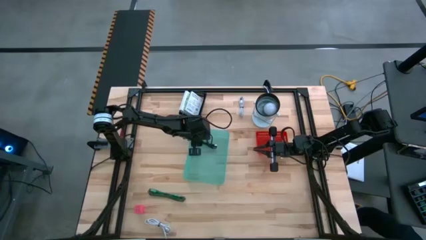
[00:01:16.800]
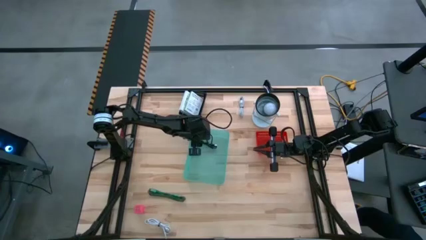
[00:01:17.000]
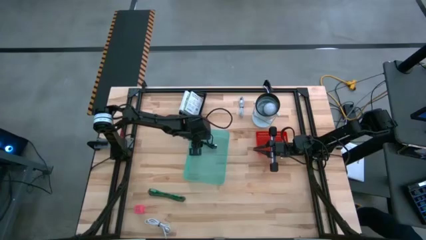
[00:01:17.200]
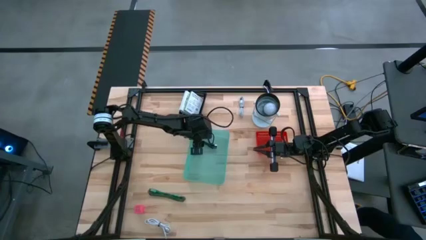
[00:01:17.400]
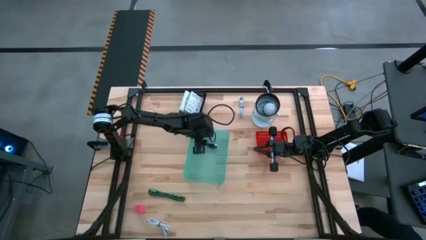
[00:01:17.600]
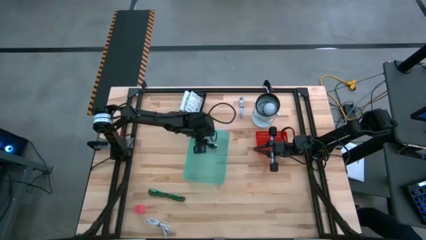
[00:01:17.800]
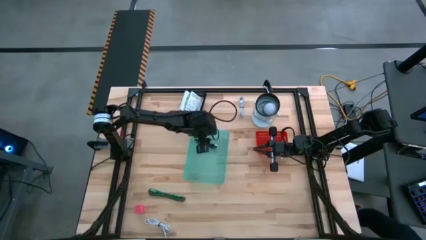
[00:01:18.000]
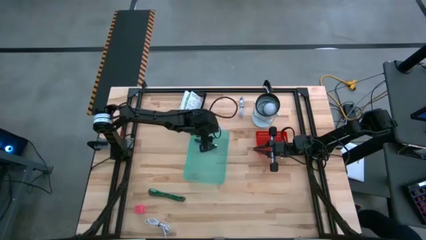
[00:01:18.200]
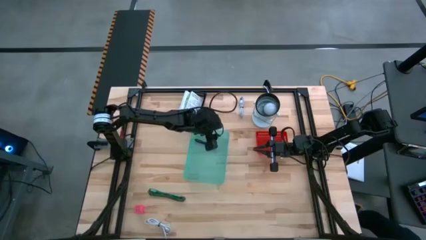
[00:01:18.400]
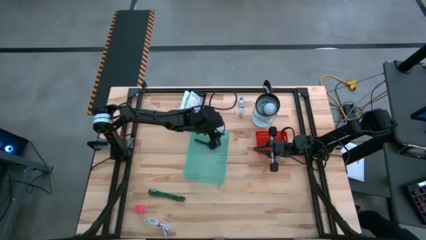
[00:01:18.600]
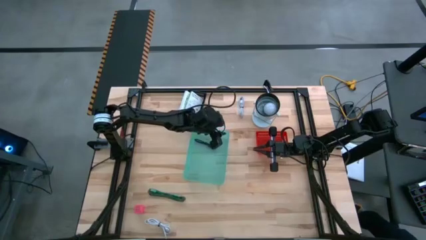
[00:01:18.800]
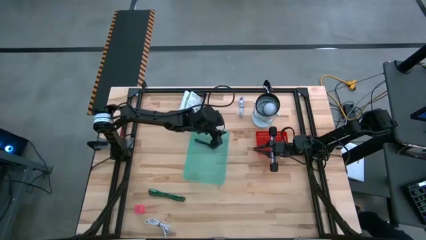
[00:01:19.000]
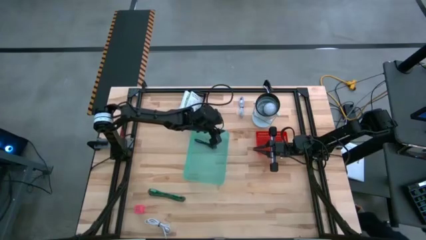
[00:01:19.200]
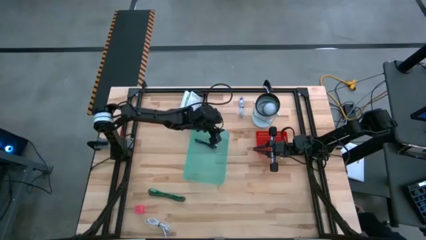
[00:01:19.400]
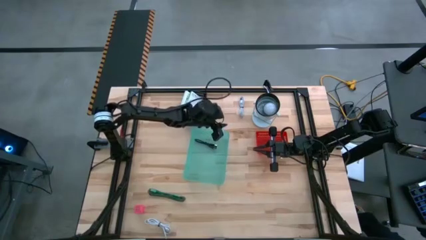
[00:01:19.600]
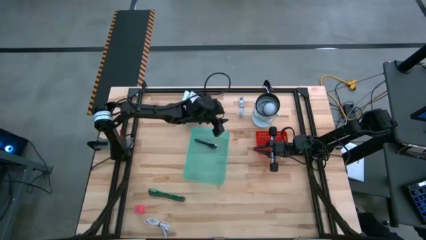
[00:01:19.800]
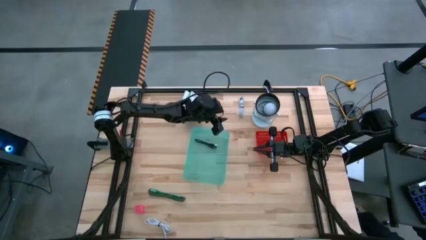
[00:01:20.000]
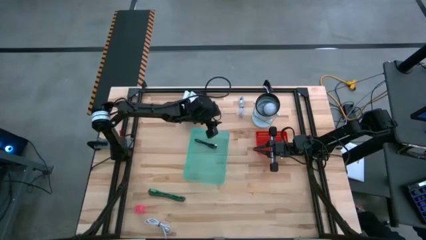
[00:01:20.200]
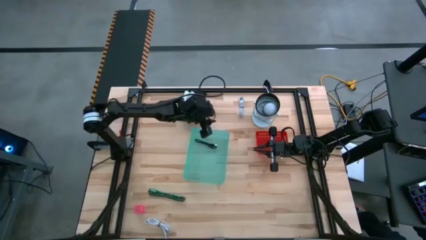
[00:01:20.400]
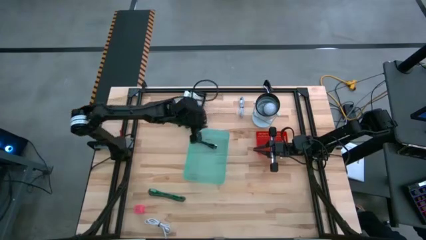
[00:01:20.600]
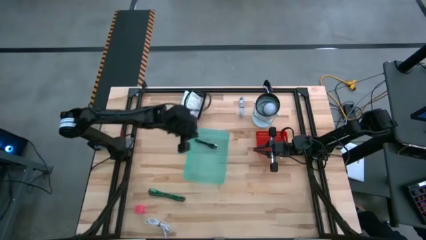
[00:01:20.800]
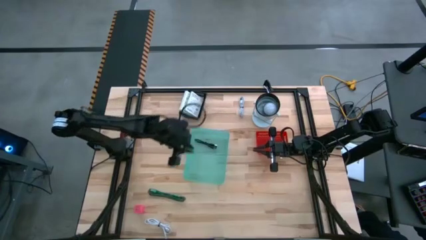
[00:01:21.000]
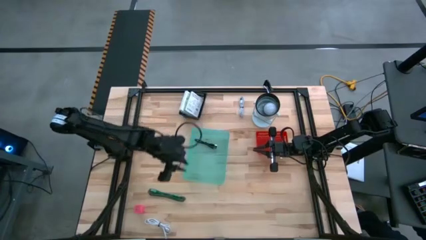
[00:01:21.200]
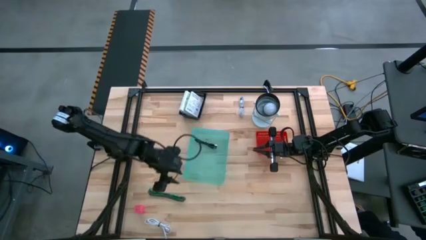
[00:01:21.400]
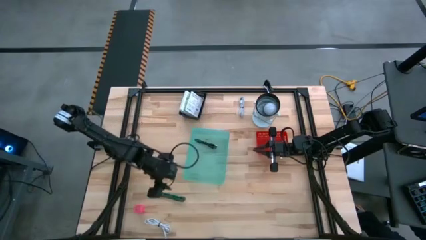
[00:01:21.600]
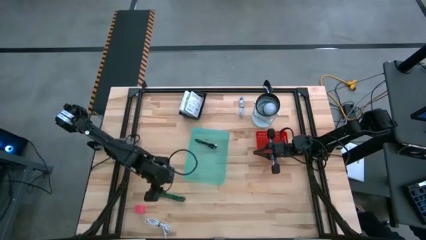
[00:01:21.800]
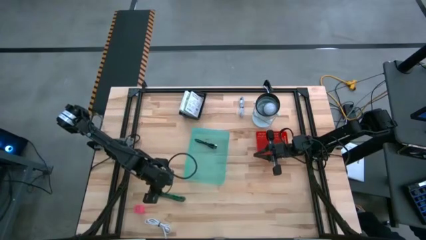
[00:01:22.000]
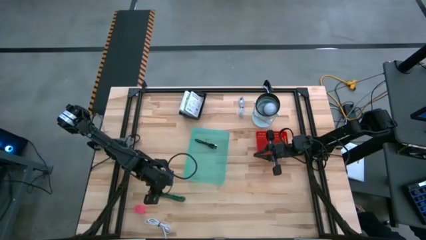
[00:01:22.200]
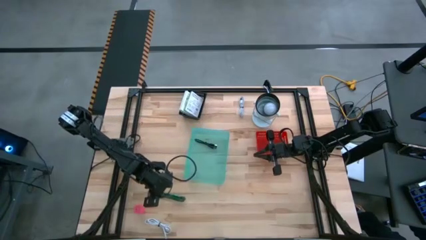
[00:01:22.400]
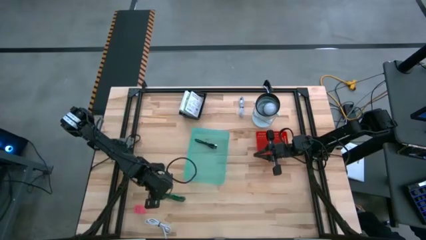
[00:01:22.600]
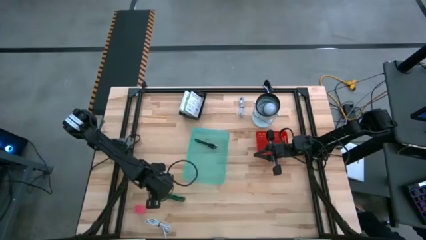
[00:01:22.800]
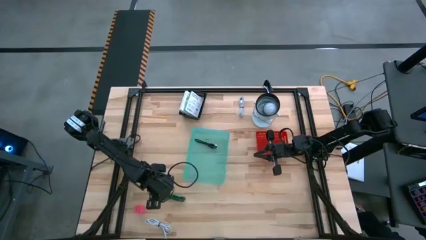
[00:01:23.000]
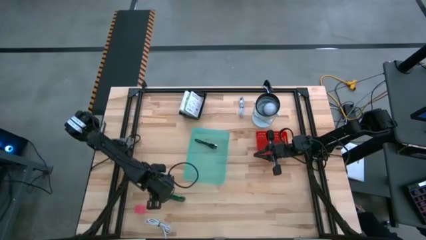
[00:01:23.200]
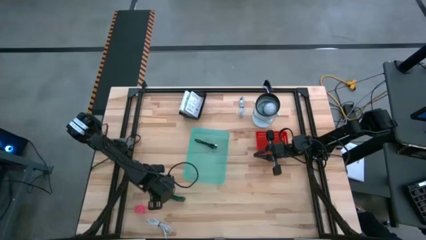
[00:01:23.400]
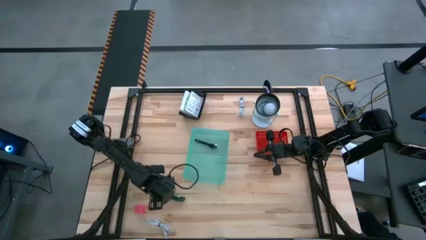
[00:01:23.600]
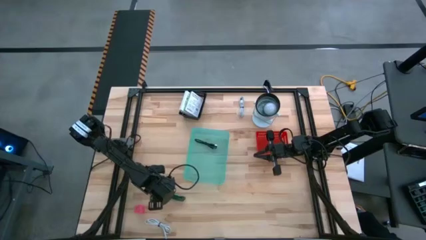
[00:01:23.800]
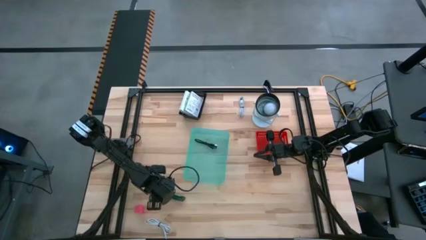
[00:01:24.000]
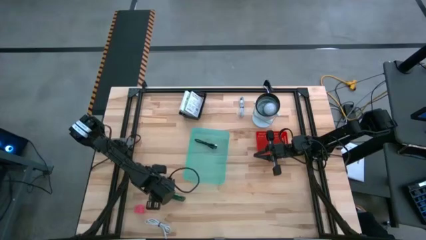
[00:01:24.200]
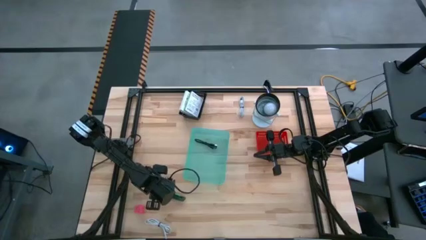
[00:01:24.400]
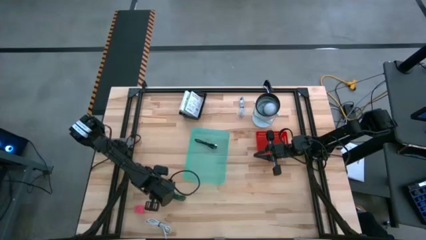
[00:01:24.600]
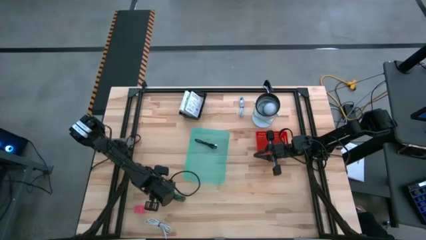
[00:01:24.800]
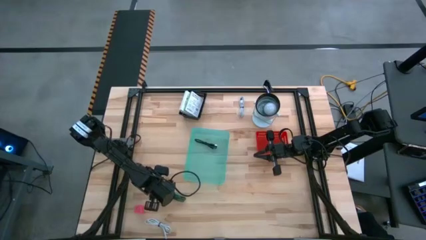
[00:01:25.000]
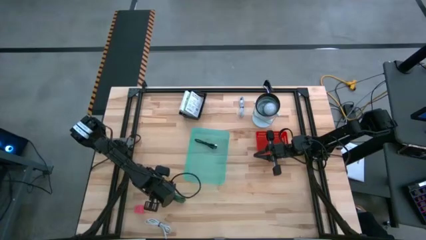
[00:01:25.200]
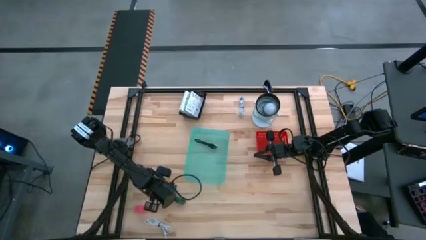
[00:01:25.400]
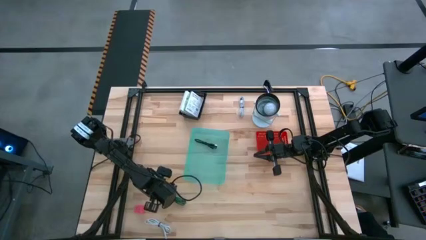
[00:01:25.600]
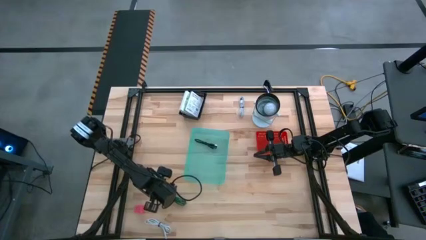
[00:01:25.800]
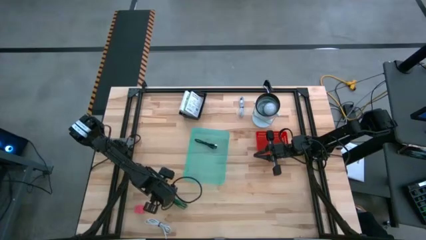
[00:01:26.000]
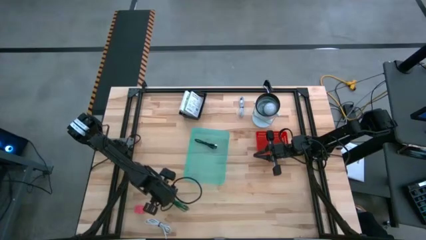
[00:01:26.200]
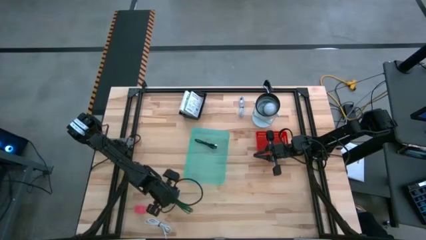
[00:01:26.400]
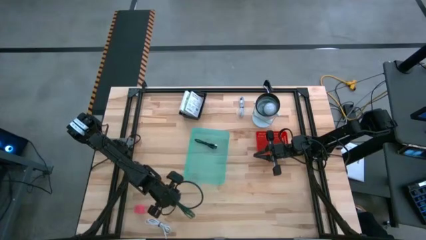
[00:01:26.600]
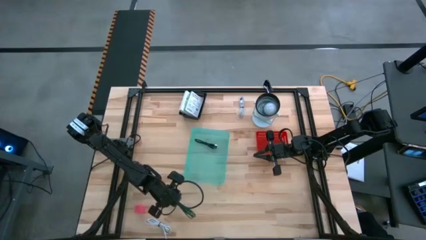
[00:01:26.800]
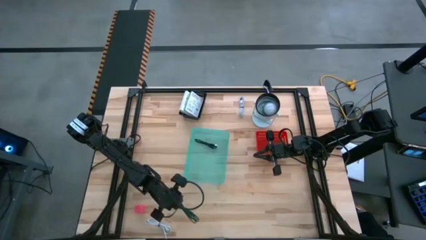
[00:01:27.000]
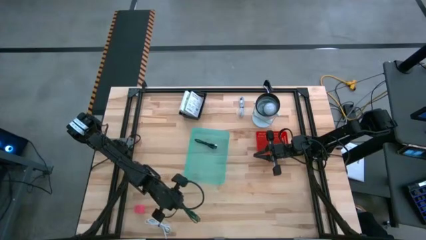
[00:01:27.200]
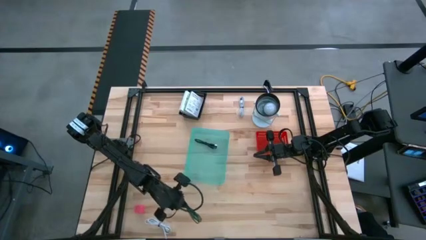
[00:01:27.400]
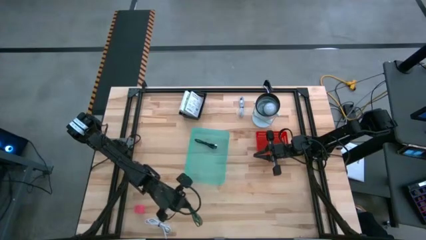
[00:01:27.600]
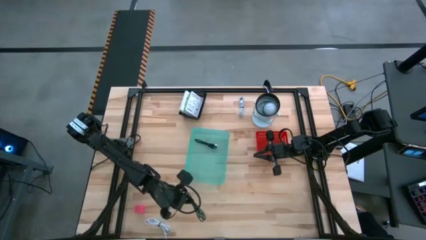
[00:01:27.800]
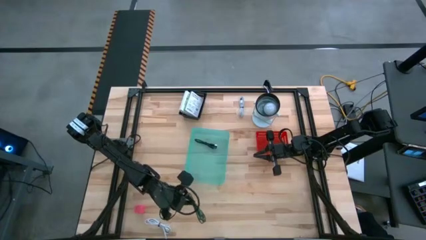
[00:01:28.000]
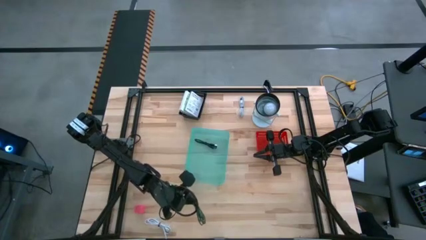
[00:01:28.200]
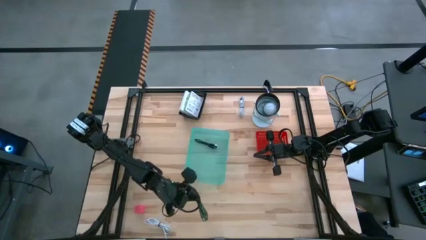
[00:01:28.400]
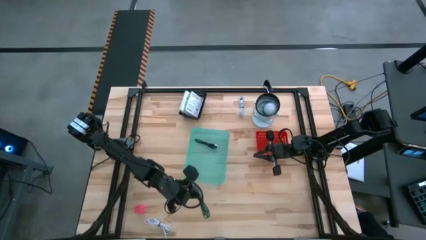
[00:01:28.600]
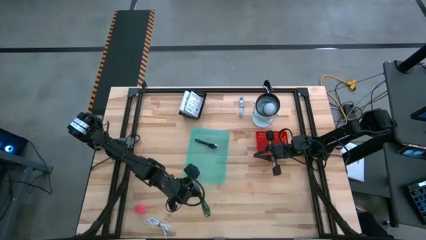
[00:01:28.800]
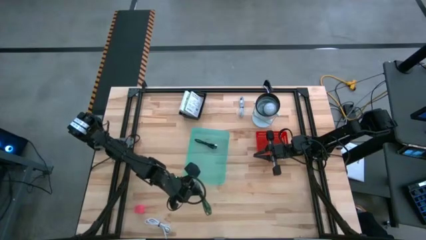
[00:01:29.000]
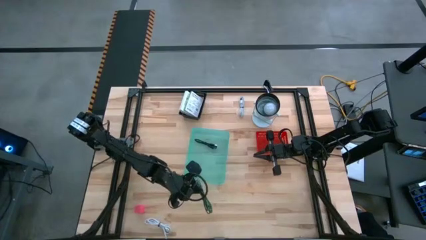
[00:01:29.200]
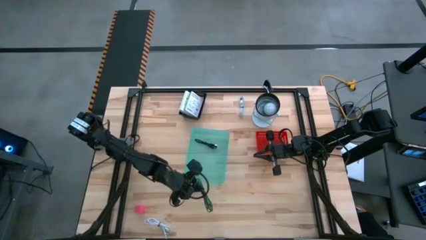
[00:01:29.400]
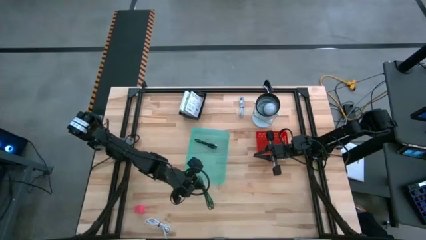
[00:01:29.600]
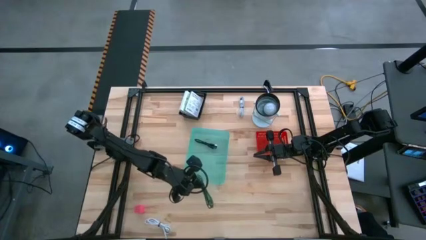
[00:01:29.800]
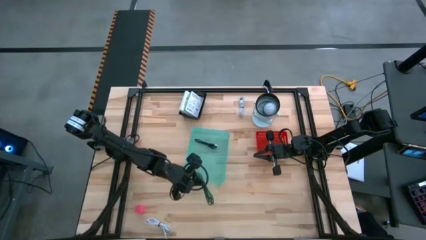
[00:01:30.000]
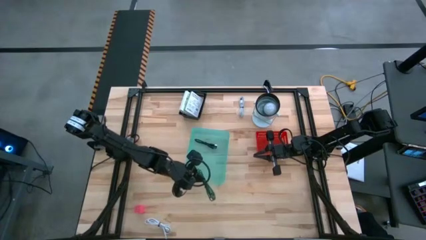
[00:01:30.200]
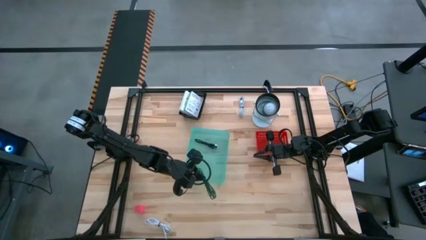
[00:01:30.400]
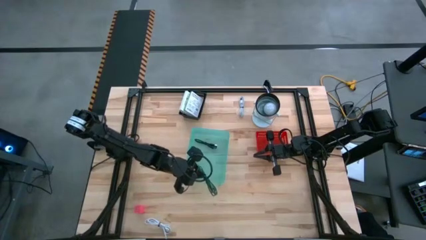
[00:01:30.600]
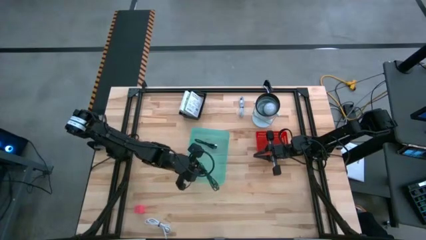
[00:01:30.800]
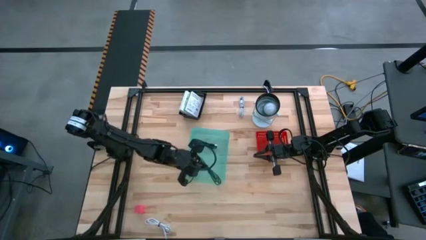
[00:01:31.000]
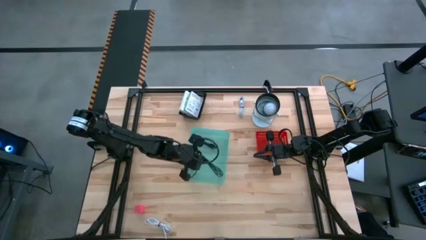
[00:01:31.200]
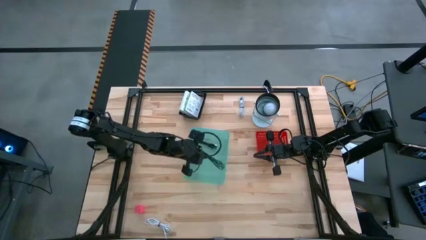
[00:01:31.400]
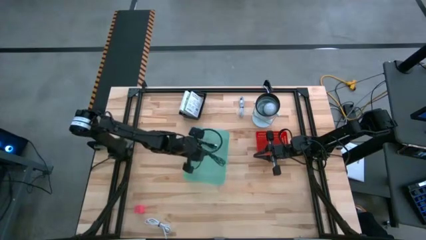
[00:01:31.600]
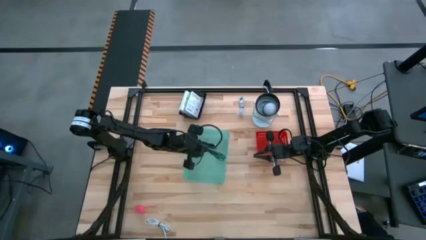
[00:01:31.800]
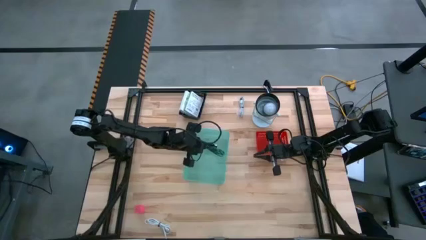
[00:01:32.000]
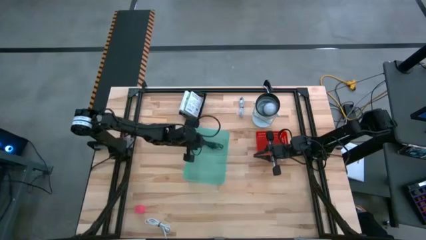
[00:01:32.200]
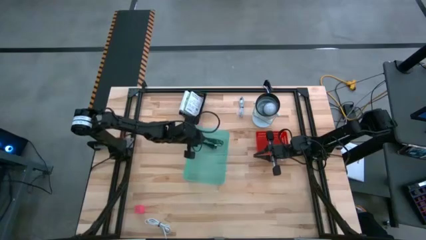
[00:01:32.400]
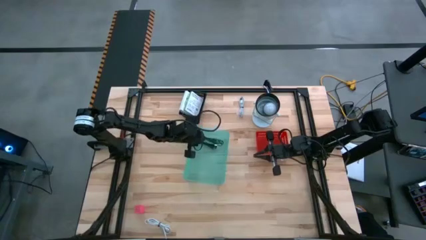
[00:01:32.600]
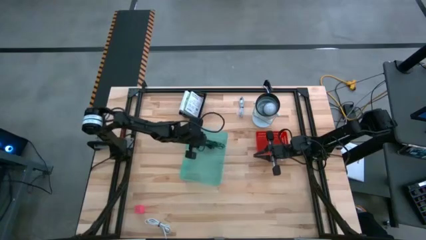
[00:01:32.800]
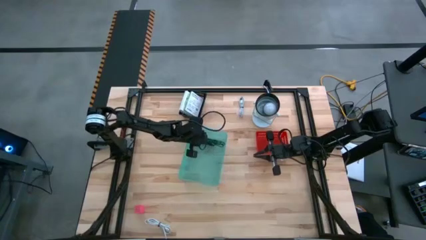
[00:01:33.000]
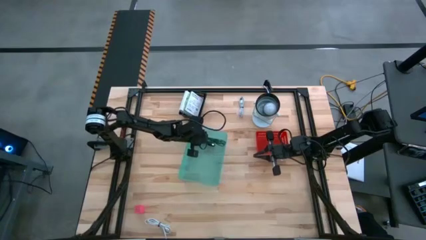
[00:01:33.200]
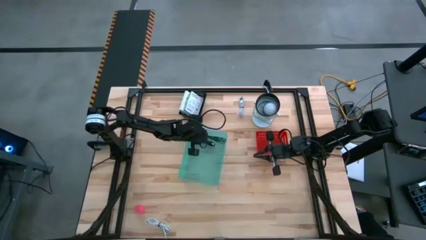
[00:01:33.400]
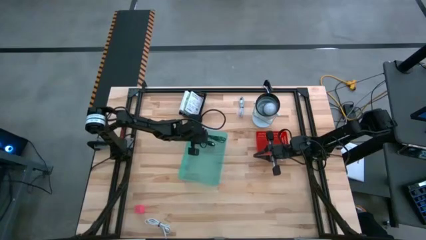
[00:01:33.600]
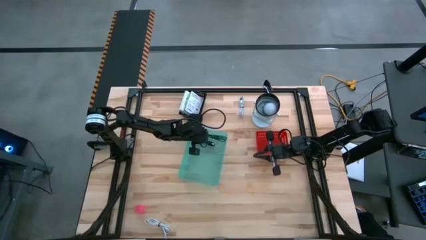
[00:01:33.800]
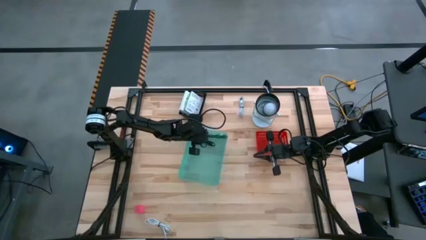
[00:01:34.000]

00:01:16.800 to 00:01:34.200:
Task: Pick and place items into bin
Put the green charger cable into the green bin
